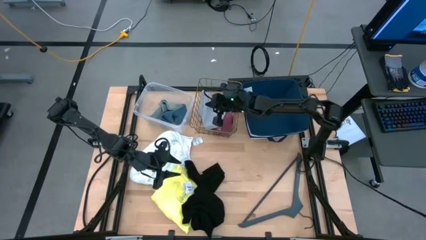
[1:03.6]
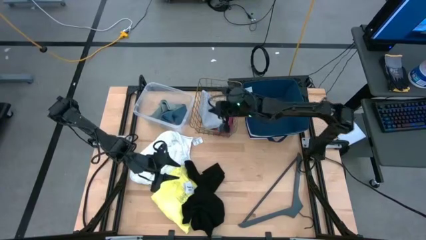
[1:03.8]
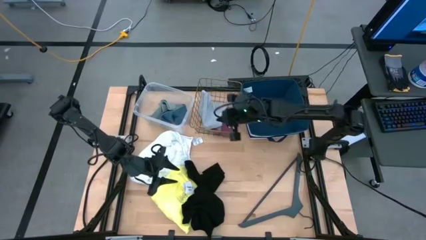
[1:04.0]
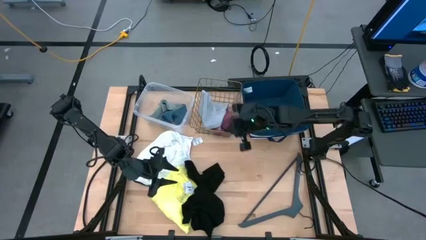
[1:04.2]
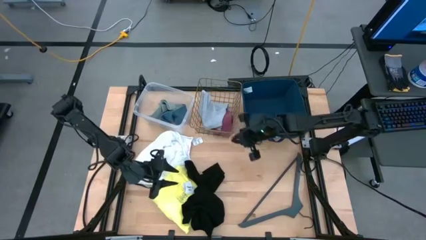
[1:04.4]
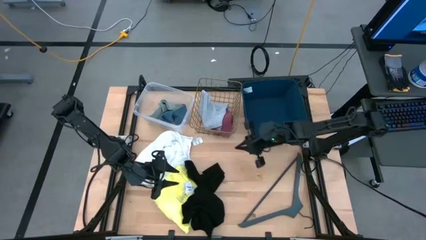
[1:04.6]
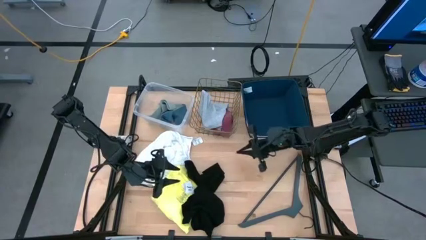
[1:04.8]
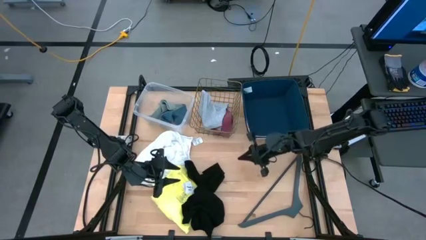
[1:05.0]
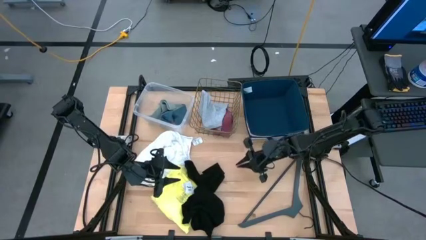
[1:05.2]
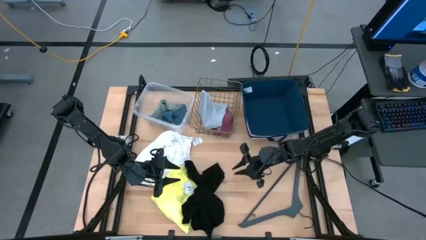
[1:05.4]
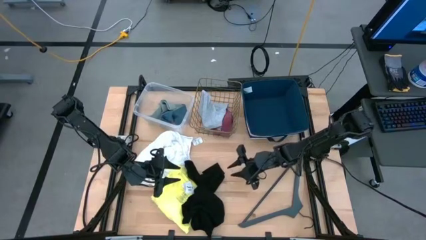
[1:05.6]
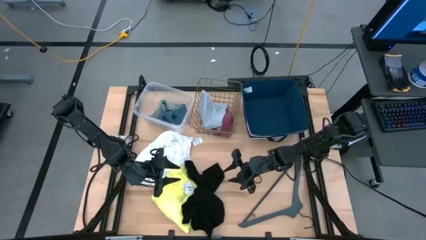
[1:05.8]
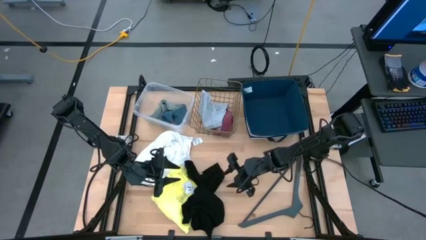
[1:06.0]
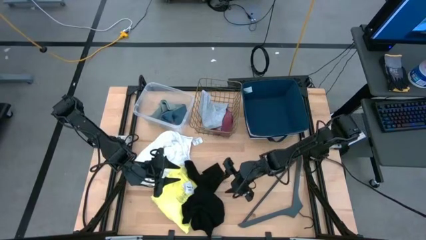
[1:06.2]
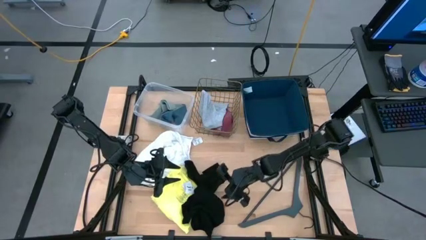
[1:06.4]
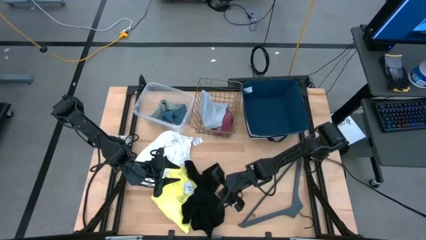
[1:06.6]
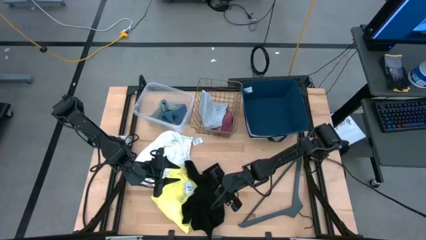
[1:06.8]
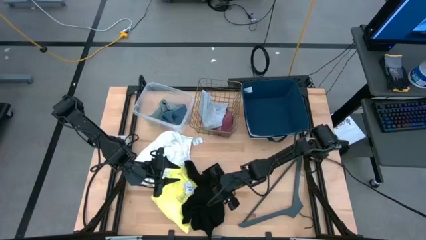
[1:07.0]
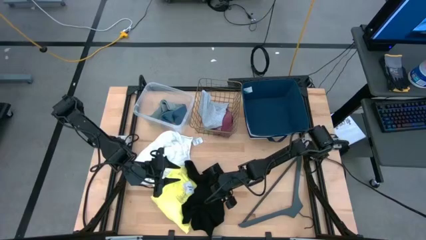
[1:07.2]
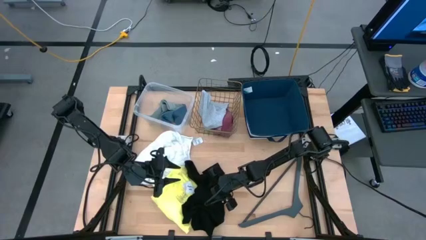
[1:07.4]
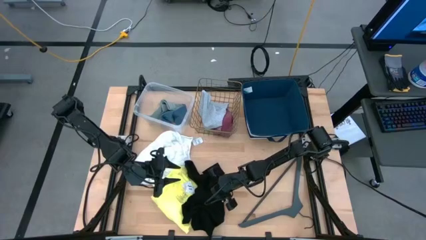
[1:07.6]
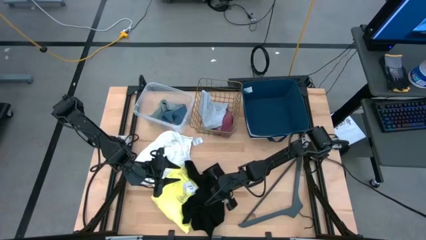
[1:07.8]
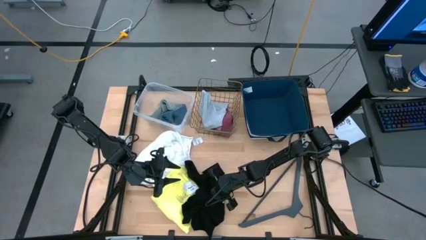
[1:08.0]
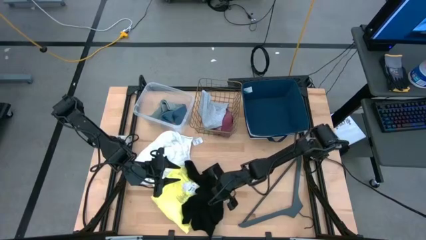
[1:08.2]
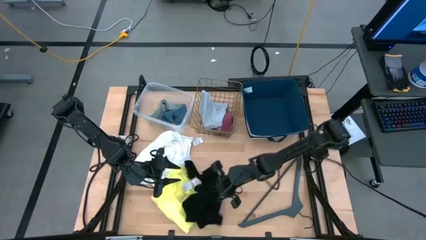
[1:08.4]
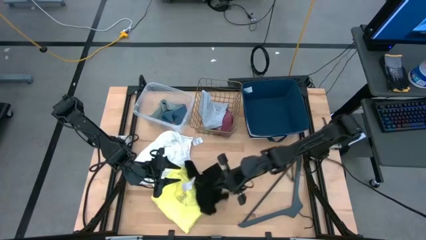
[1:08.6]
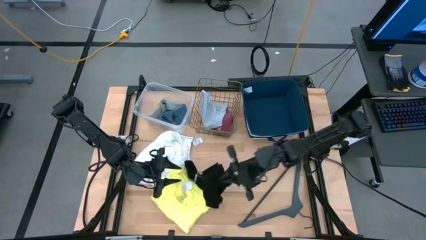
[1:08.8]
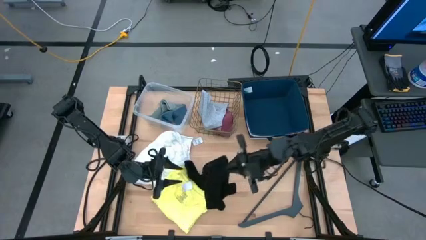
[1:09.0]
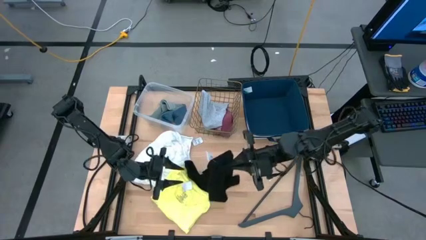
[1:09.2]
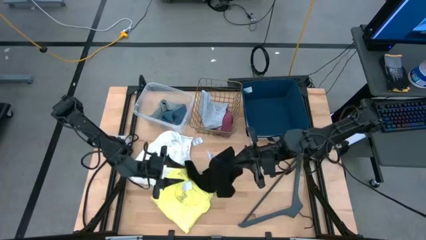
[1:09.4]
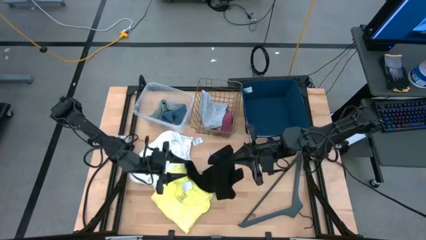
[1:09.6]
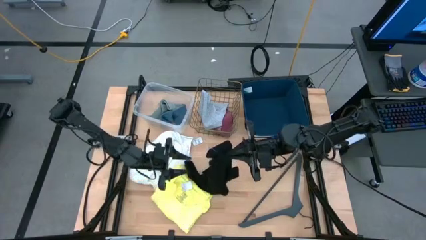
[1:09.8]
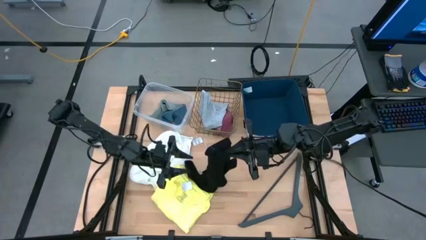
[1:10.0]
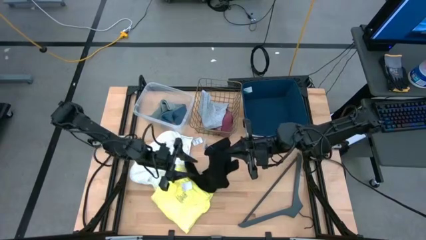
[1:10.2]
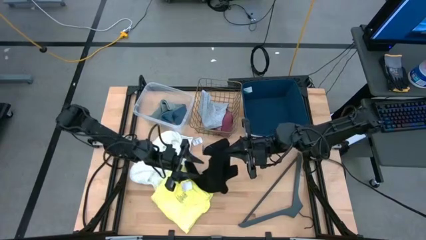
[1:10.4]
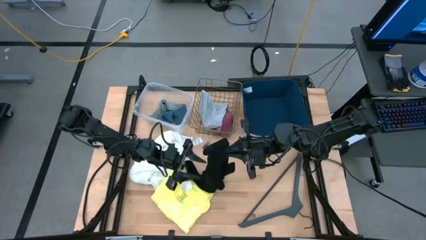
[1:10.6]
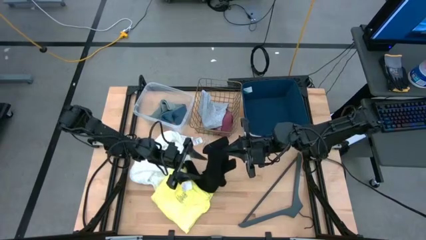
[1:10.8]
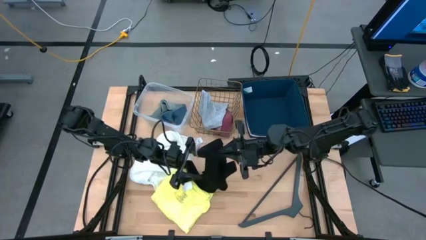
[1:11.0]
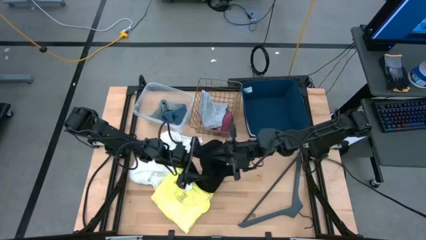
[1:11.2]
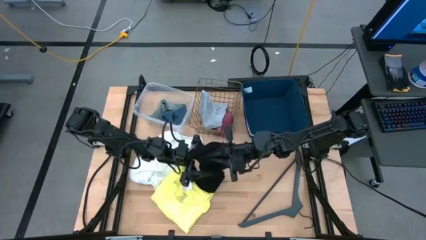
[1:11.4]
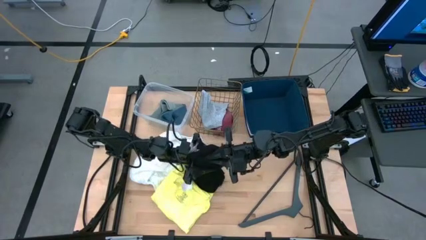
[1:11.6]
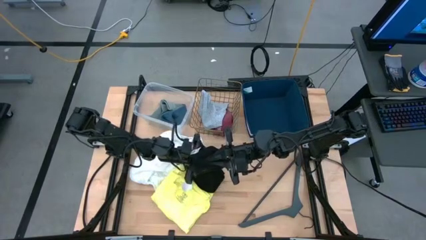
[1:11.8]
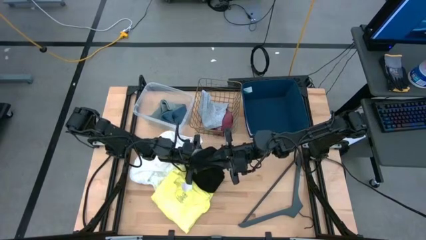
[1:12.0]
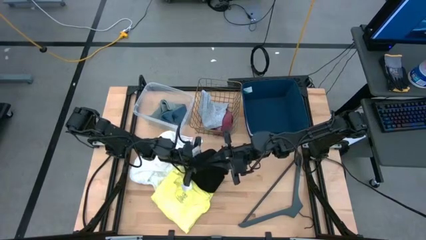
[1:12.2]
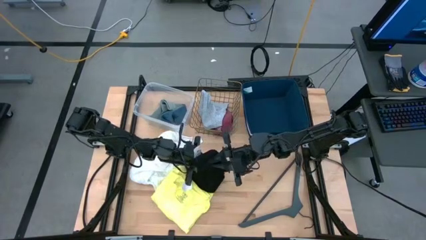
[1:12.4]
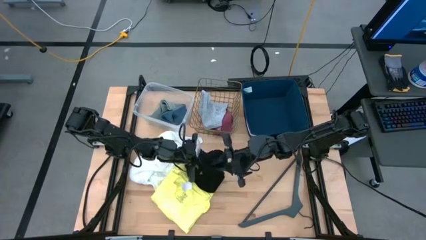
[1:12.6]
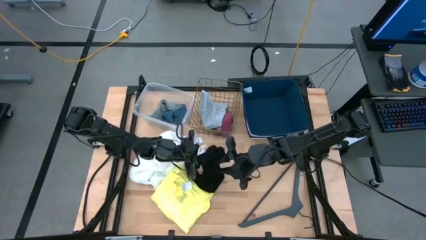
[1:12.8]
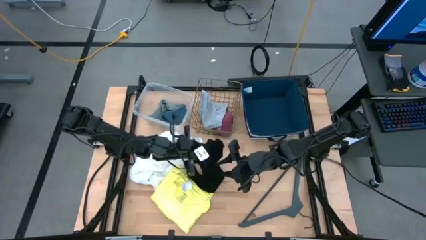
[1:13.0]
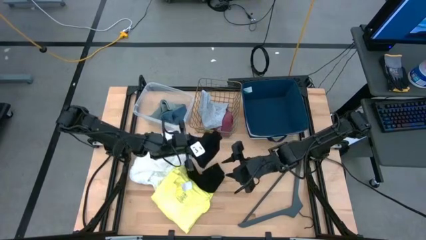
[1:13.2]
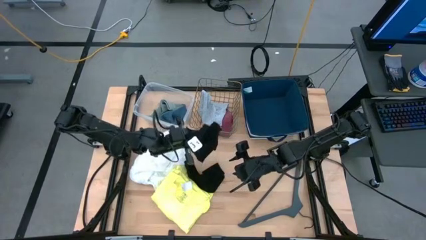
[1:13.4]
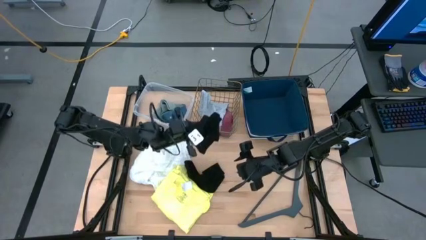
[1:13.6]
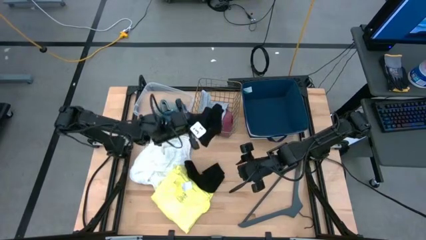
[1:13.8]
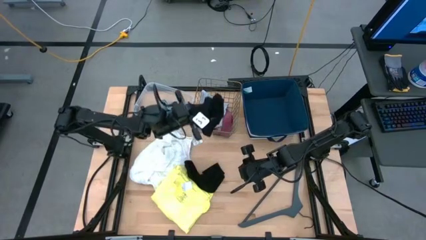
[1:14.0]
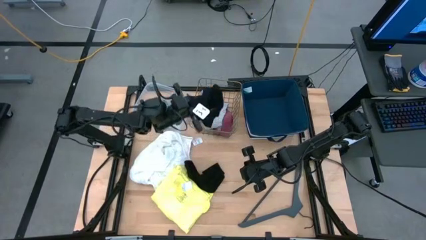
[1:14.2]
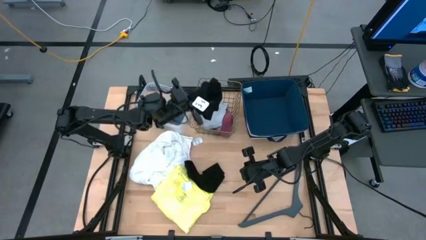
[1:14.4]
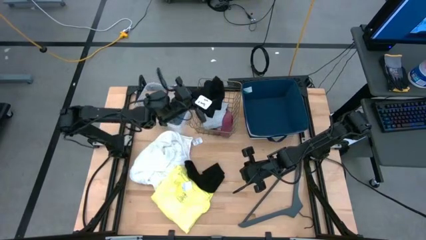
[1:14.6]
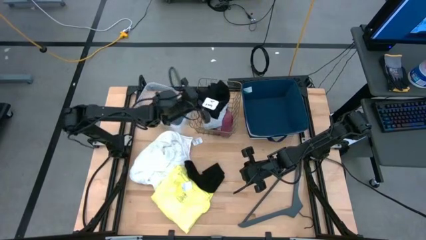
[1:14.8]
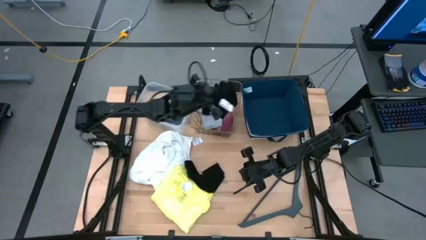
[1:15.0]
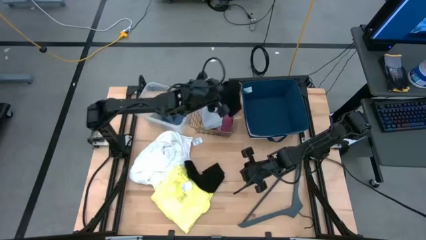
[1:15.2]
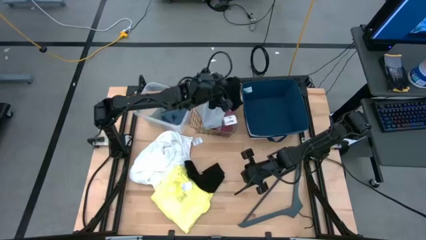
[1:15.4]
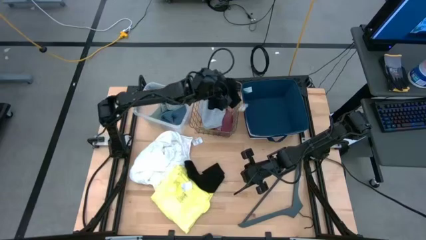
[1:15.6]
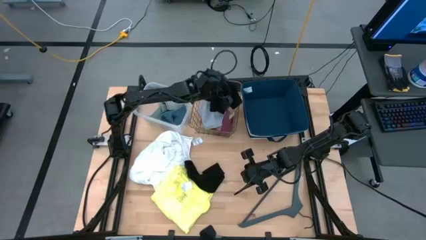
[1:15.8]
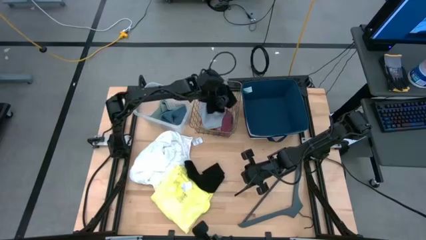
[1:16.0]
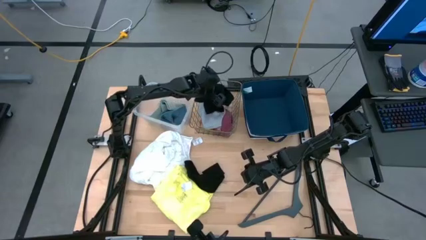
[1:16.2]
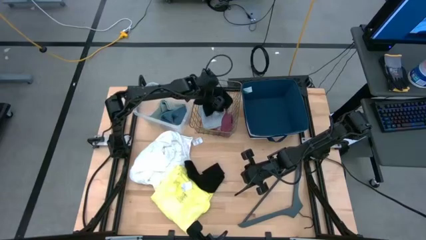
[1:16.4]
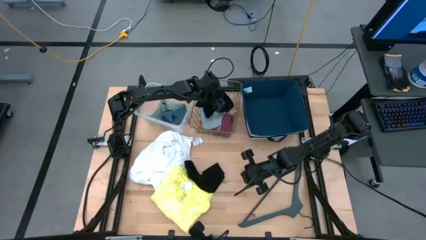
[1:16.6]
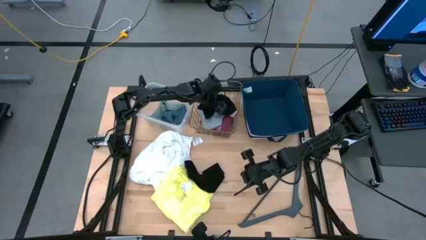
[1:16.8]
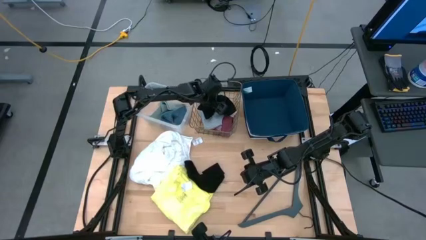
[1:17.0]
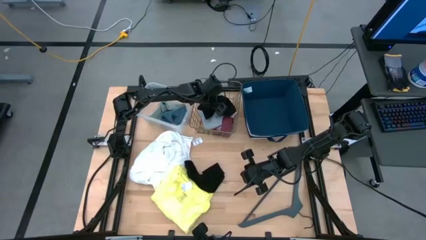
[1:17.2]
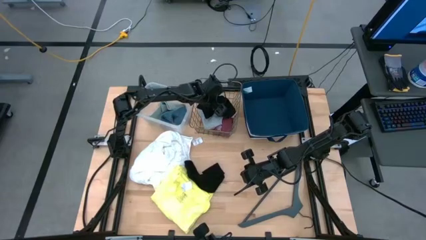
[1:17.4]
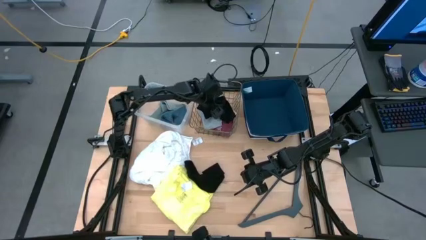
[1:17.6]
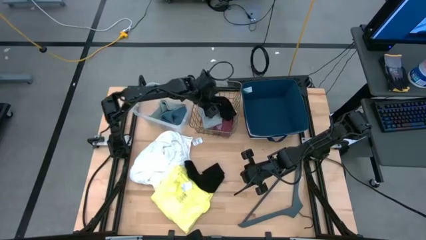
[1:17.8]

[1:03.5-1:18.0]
Task: Pick & Place Cloths
Put the black underwear into the mesh basket
